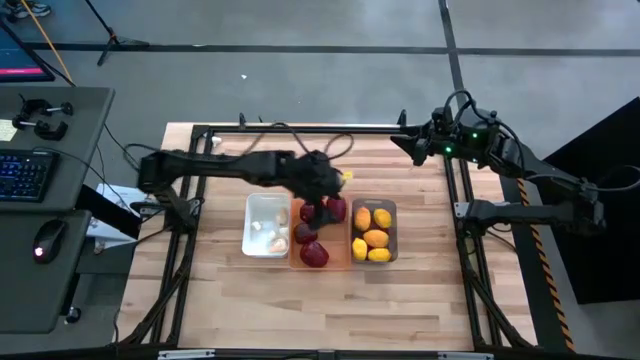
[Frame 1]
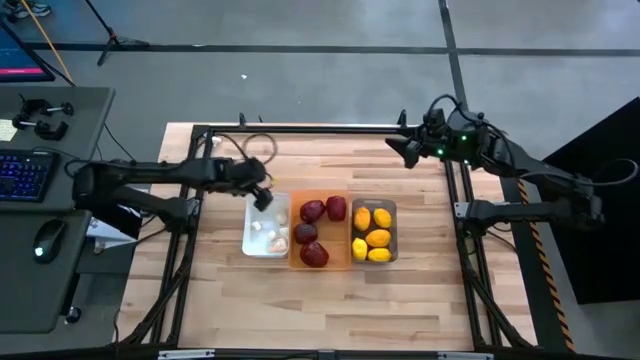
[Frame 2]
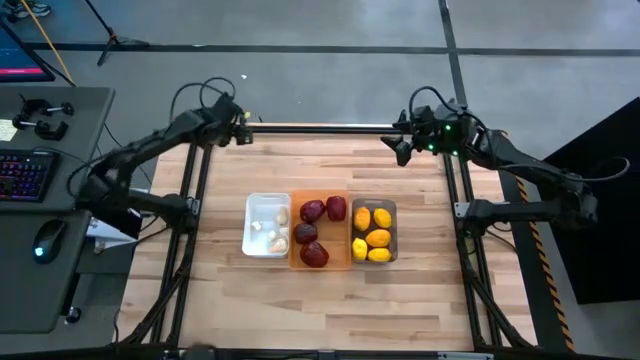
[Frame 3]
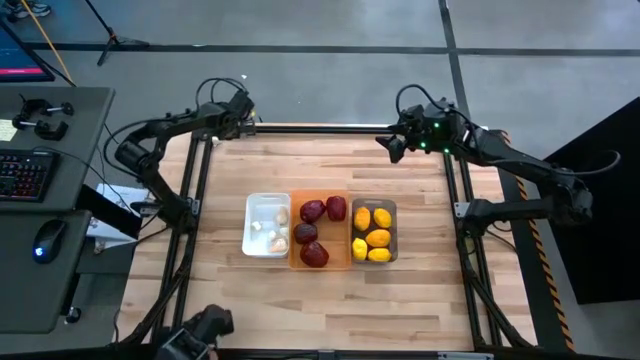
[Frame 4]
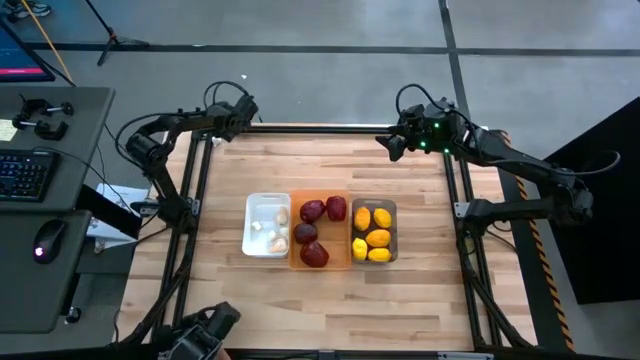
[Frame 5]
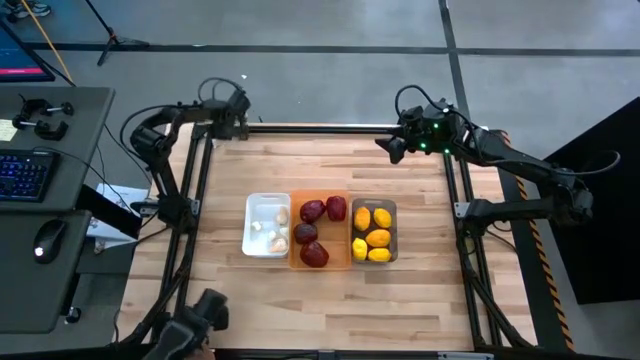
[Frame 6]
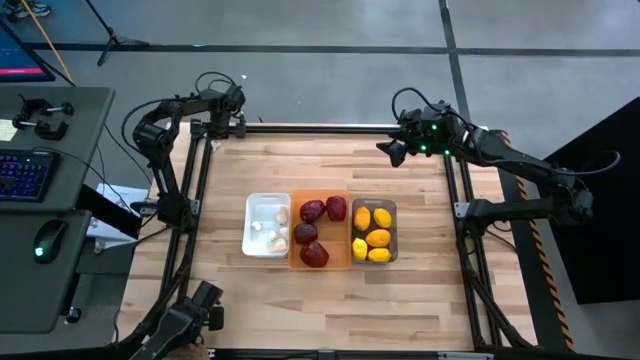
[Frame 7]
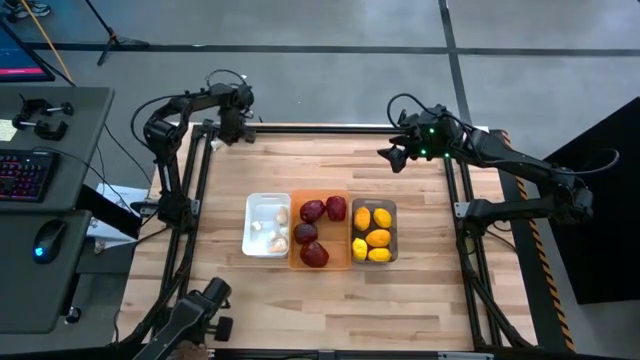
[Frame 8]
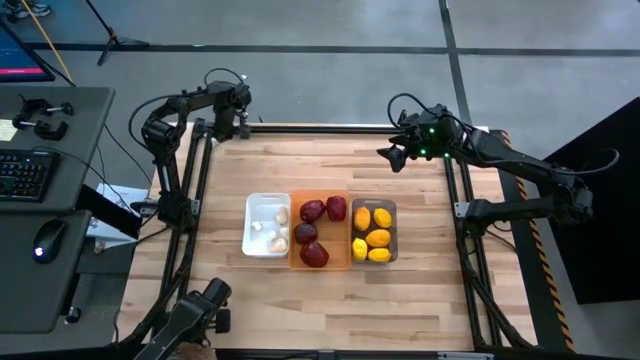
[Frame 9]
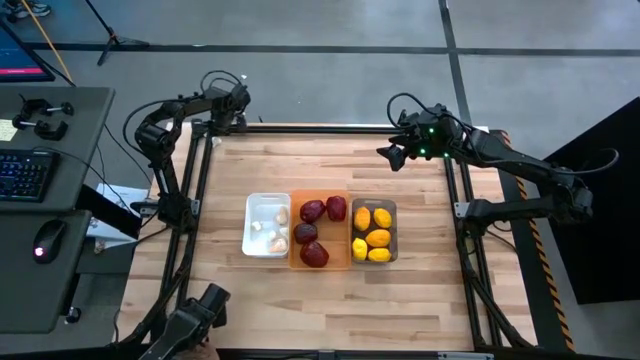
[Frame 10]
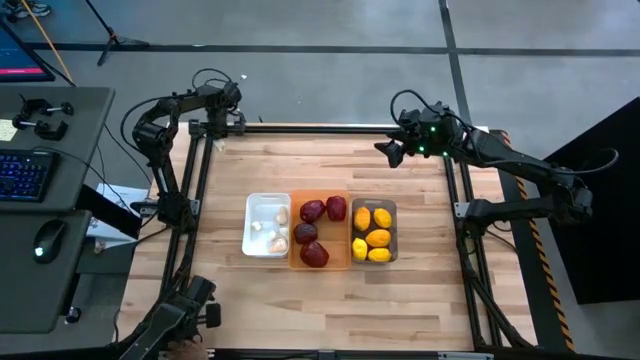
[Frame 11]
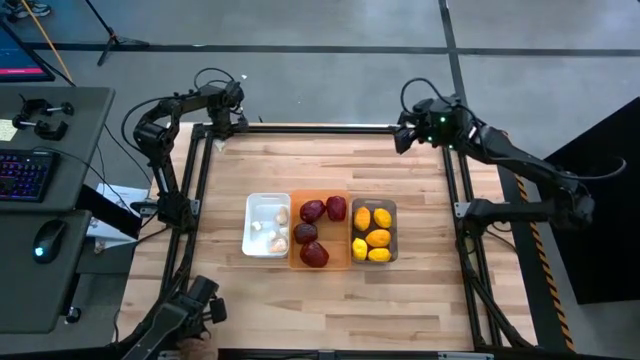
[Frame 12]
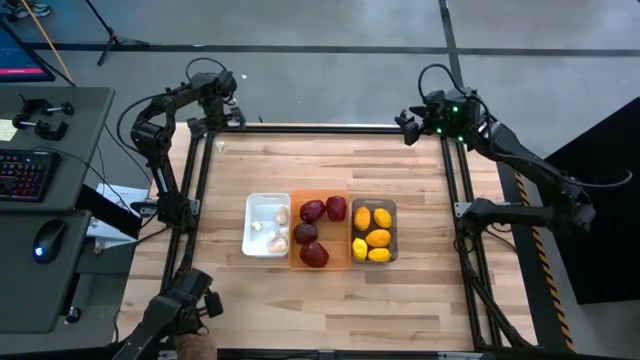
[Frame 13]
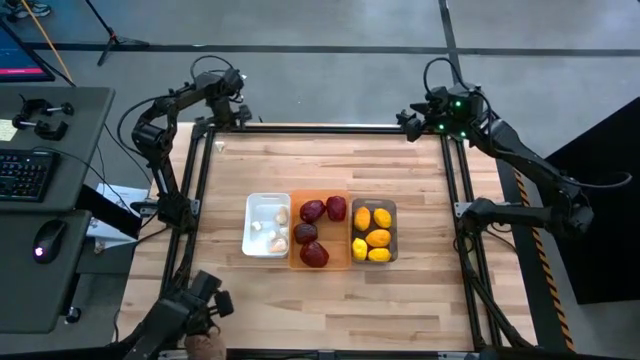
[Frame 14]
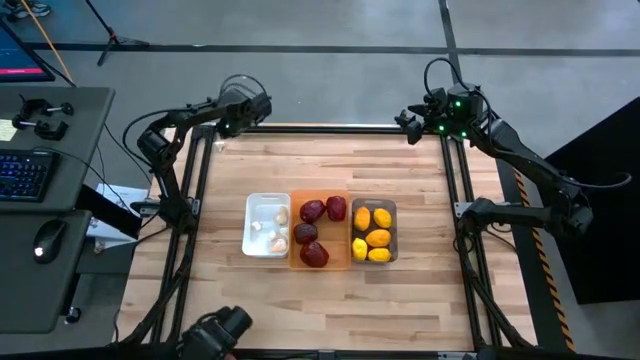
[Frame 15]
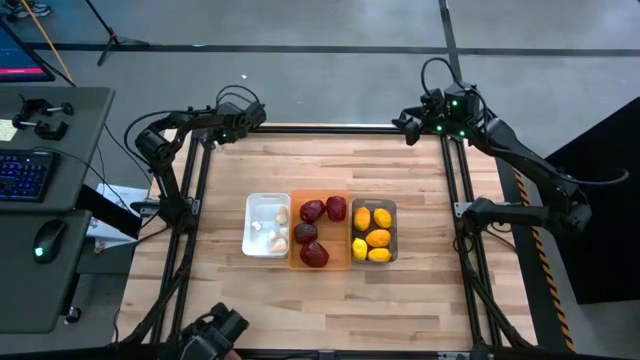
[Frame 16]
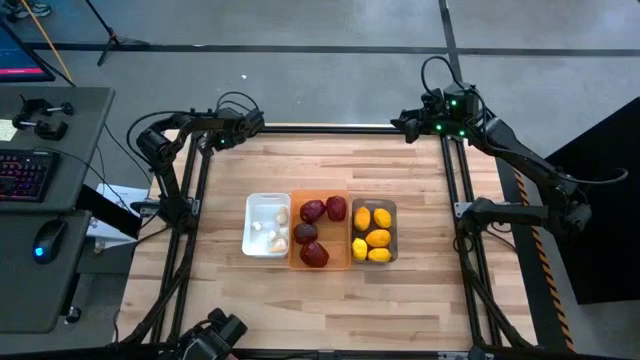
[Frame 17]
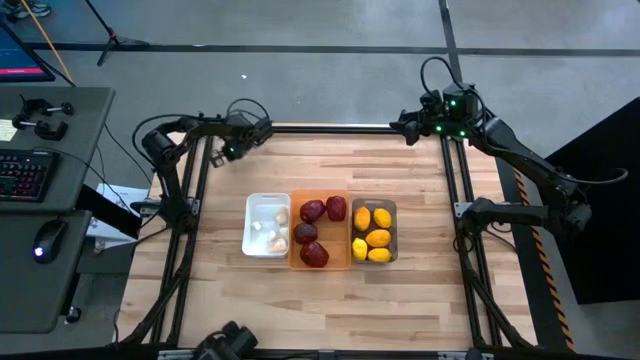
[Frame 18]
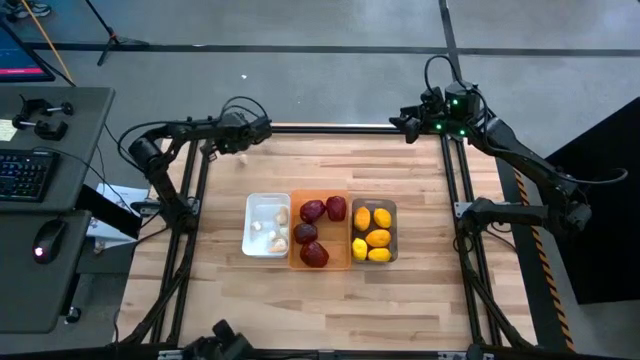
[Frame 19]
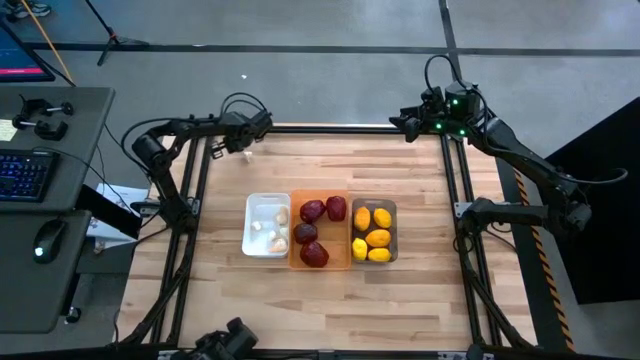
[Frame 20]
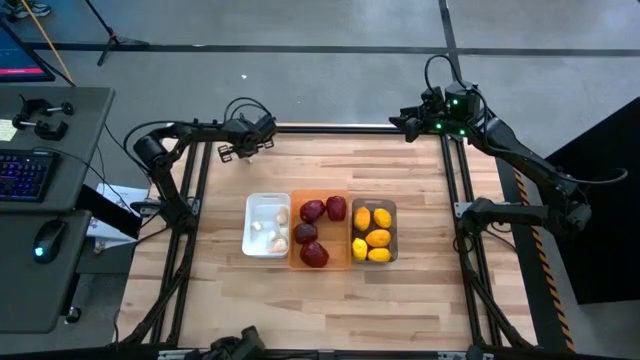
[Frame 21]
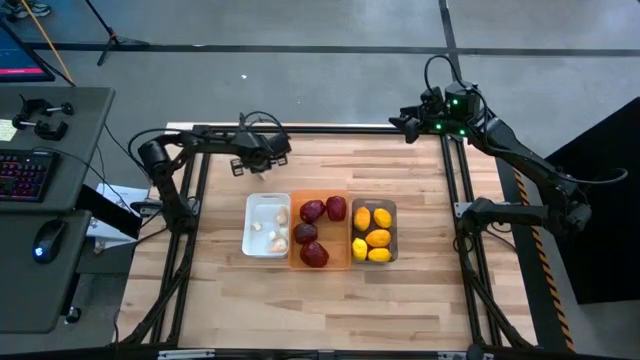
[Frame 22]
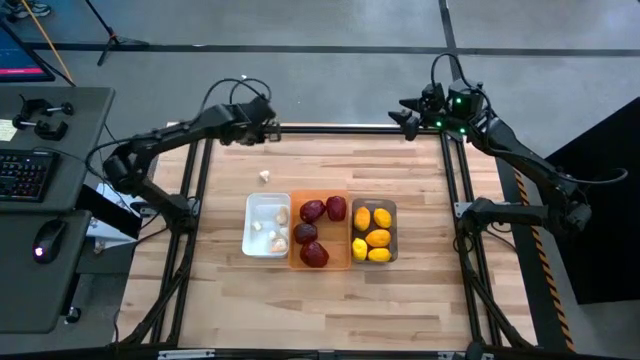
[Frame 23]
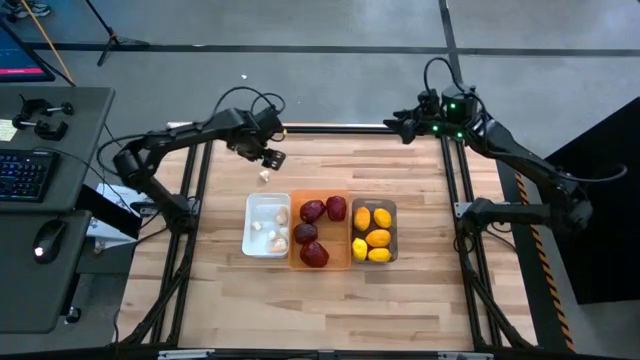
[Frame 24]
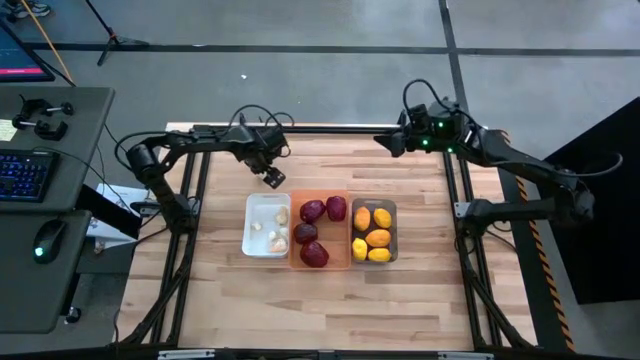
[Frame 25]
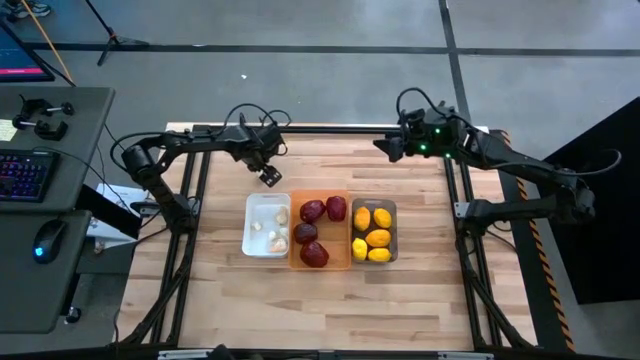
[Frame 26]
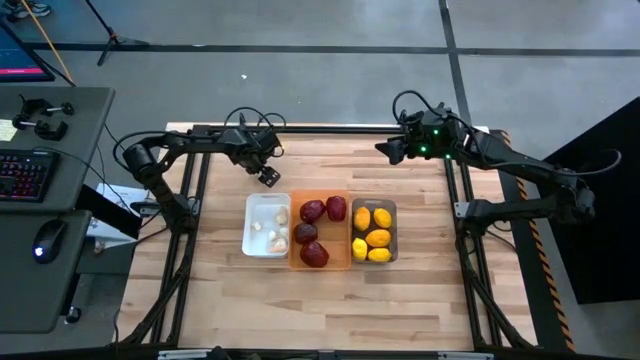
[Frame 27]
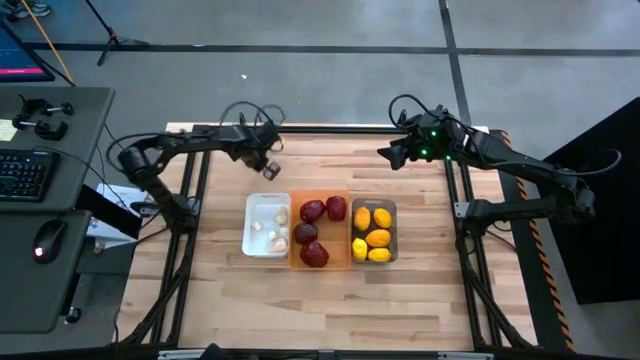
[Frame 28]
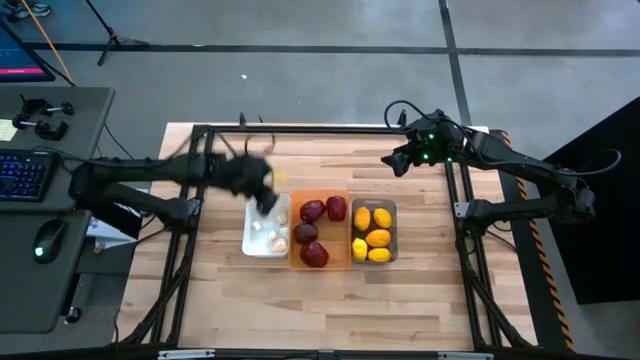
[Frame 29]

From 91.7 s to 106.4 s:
Task: Sort produce into baskets
Put the white garlic into the white bin

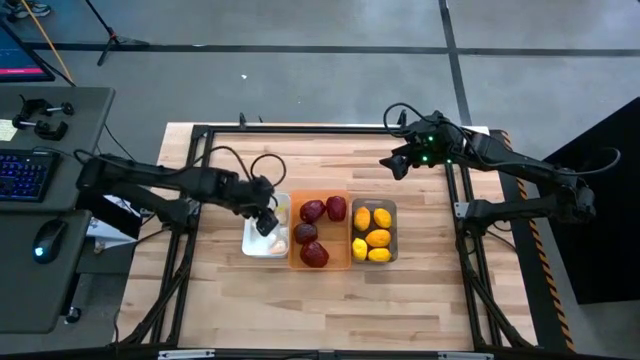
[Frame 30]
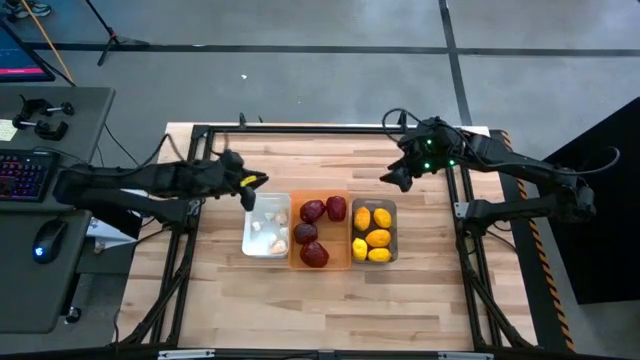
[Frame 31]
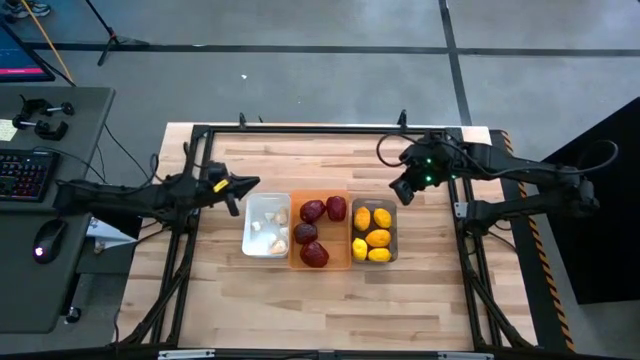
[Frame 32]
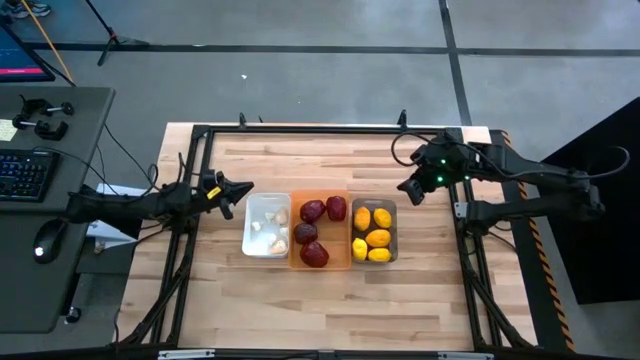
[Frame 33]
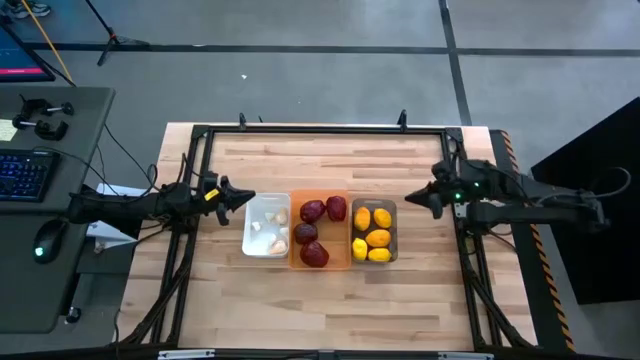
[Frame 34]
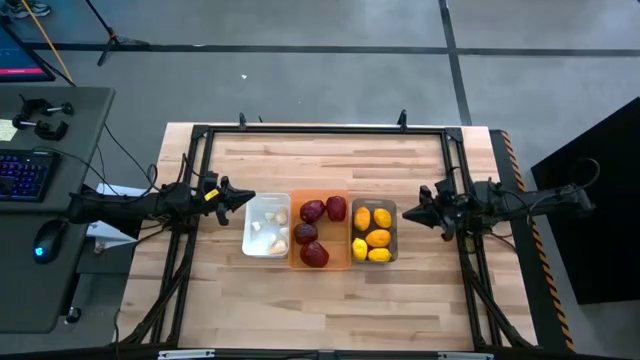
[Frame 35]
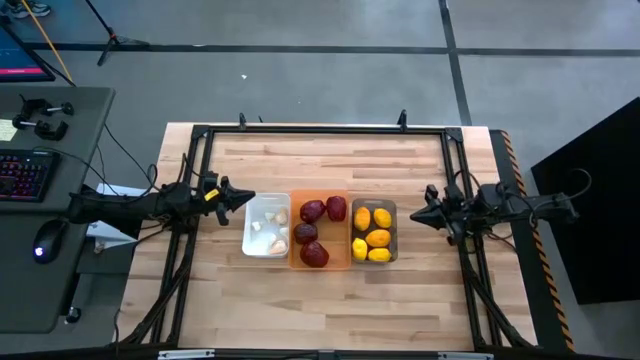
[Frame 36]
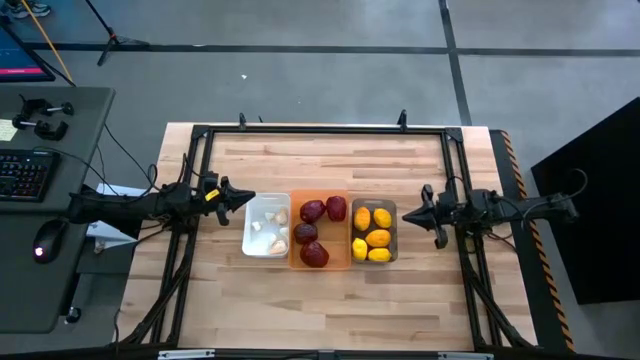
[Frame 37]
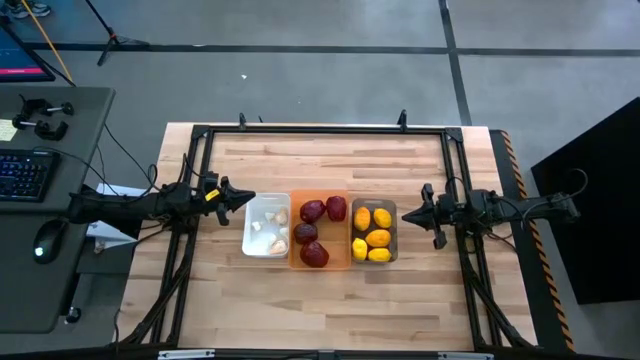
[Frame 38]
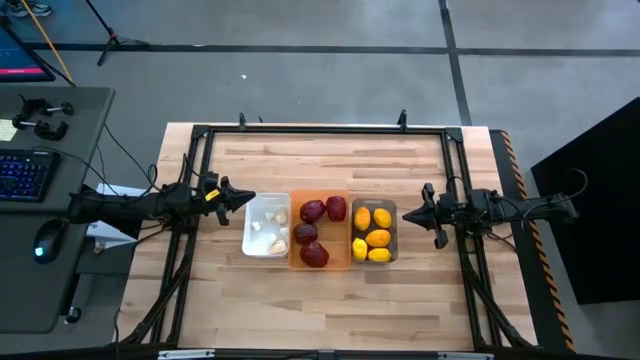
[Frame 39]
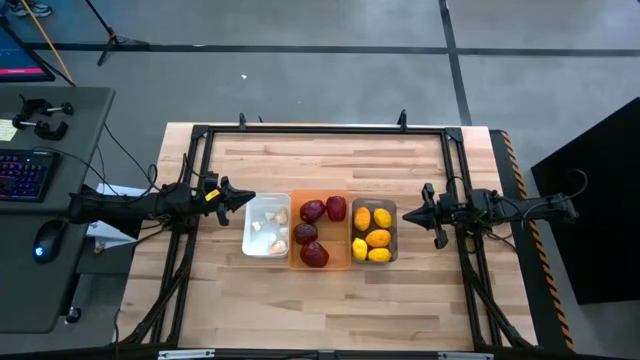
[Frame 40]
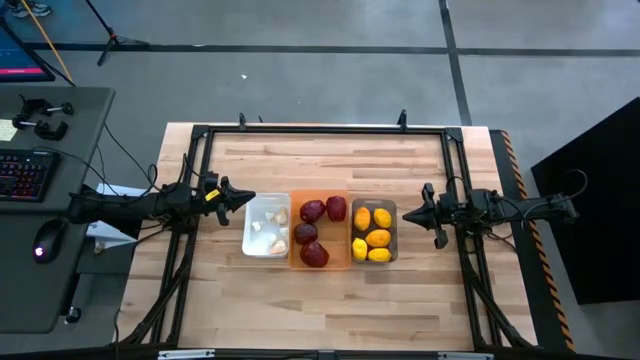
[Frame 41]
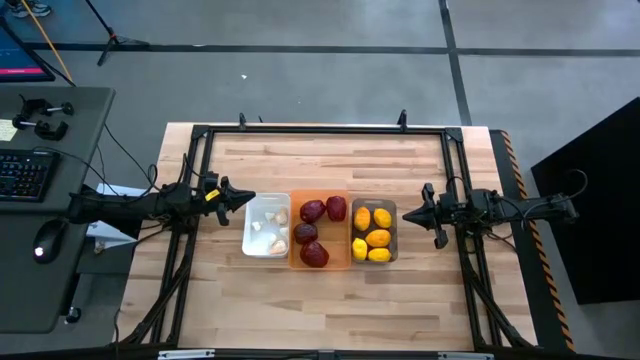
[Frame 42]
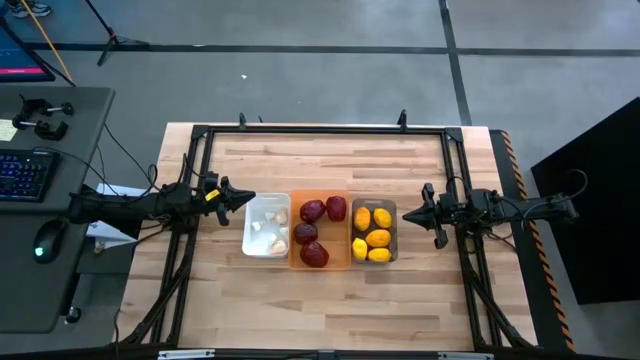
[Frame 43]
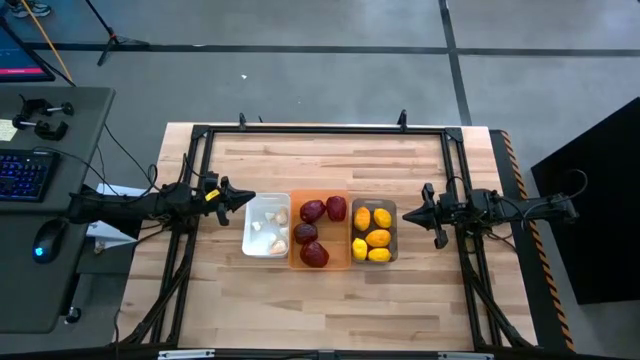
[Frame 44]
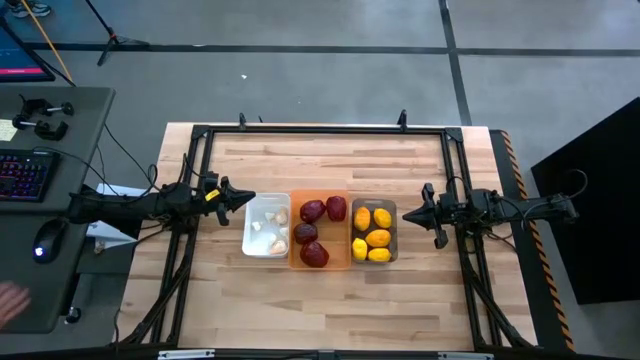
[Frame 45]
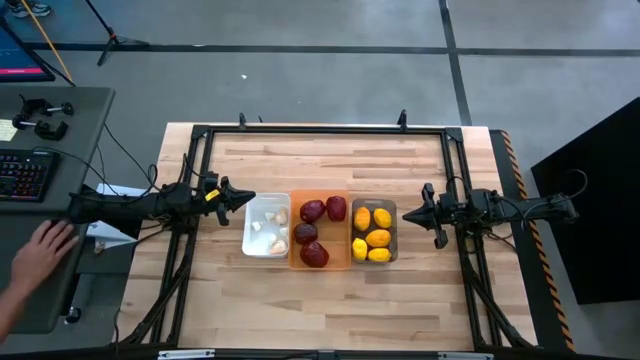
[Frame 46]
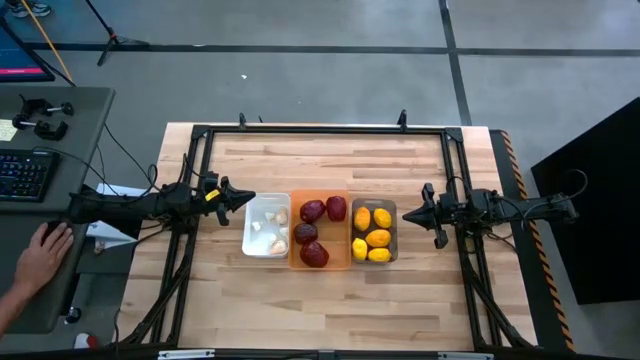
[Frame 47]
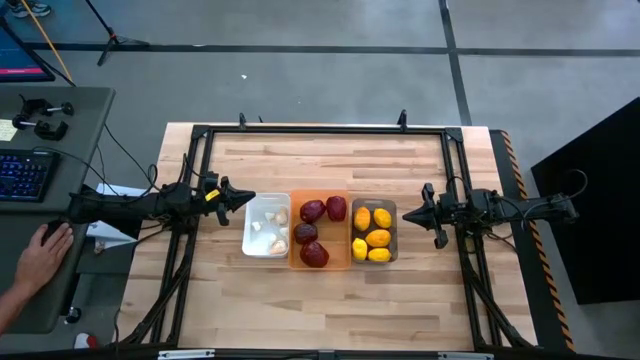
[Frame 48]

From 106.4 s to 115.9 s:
Return to Home Position
